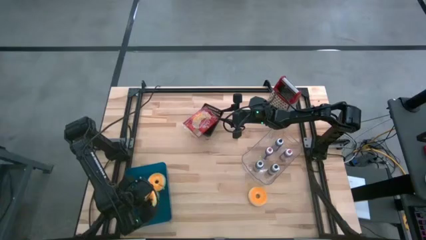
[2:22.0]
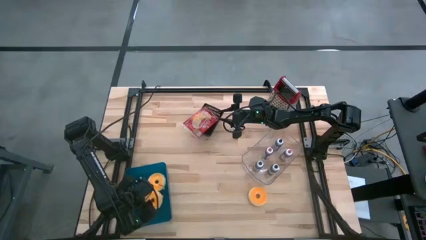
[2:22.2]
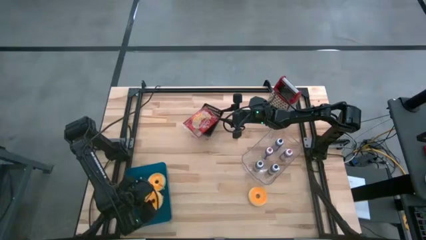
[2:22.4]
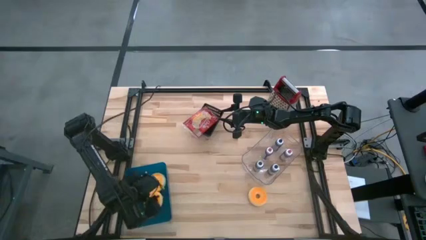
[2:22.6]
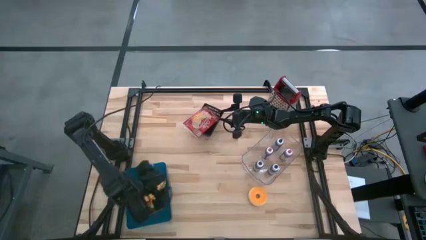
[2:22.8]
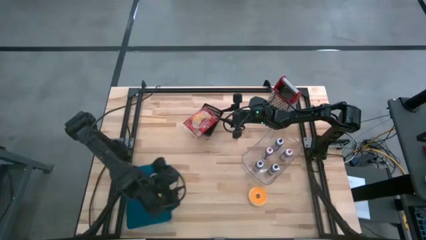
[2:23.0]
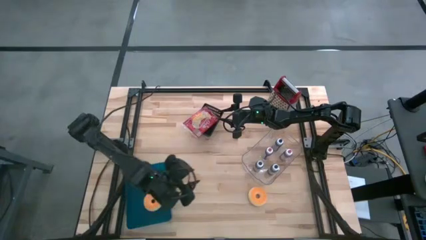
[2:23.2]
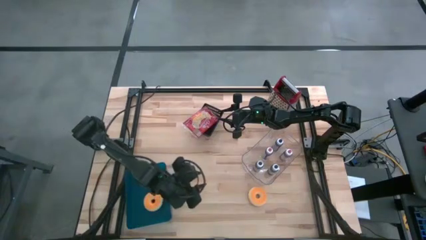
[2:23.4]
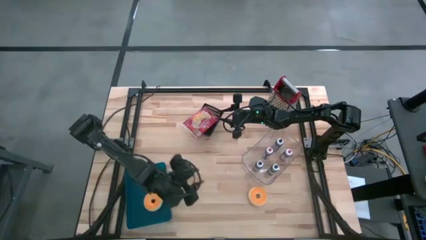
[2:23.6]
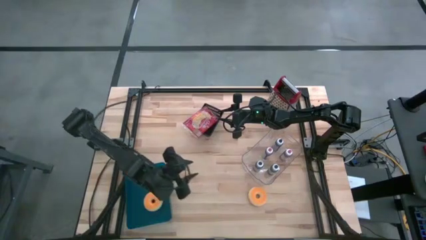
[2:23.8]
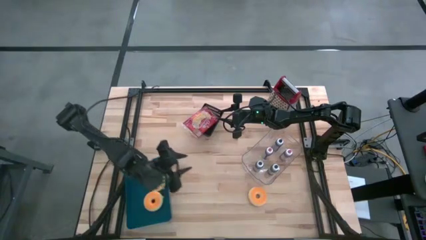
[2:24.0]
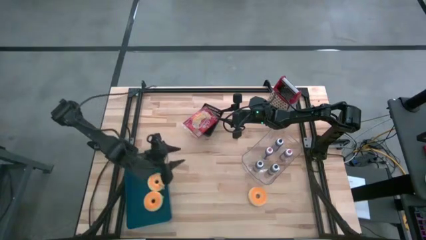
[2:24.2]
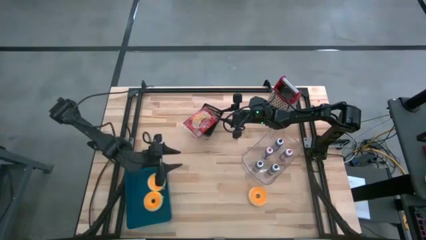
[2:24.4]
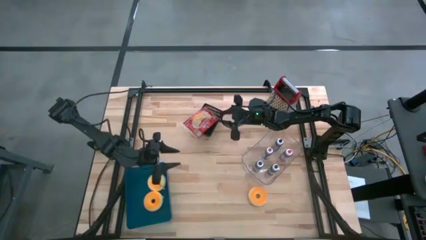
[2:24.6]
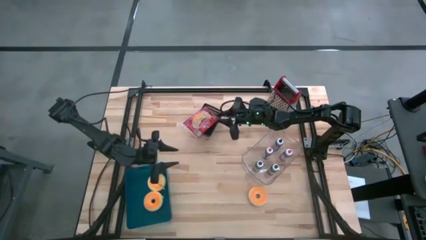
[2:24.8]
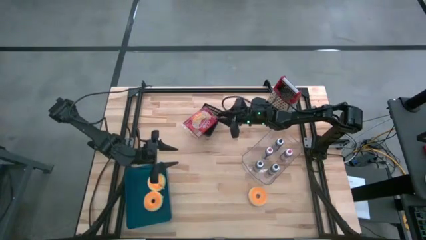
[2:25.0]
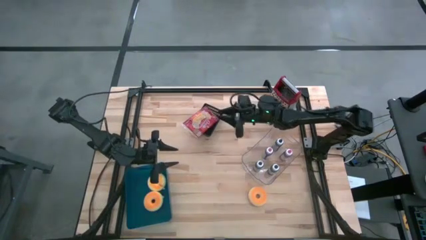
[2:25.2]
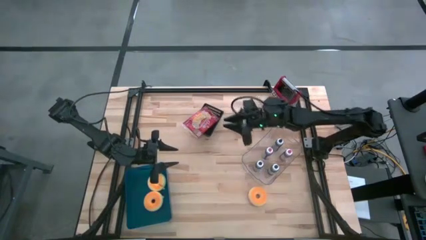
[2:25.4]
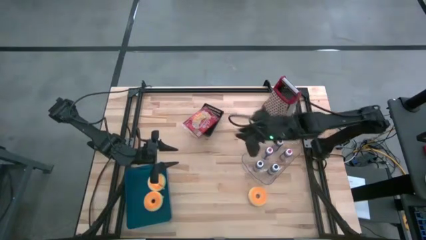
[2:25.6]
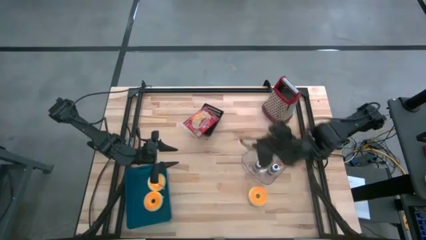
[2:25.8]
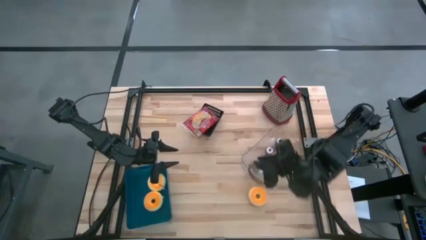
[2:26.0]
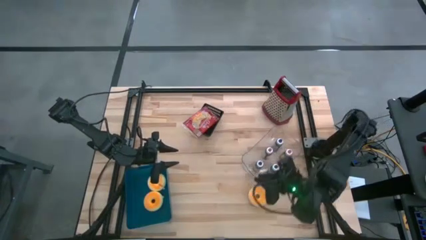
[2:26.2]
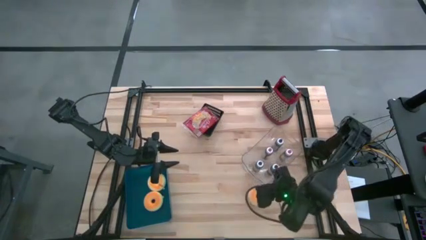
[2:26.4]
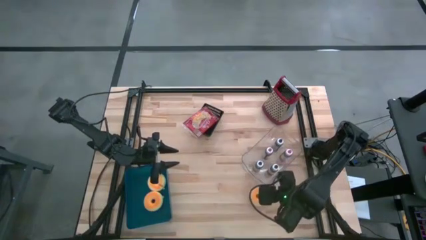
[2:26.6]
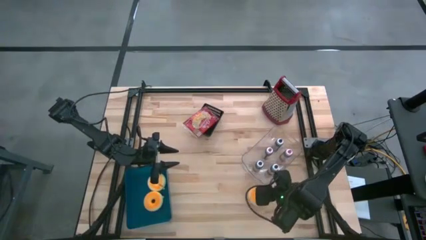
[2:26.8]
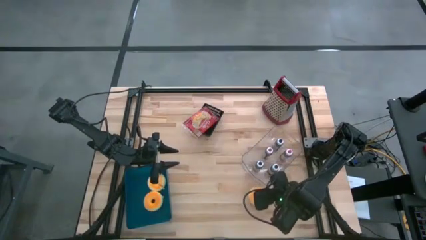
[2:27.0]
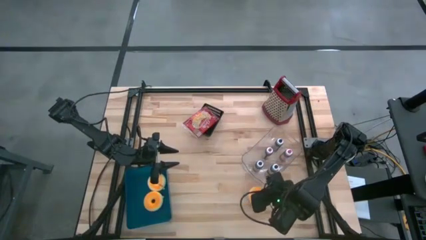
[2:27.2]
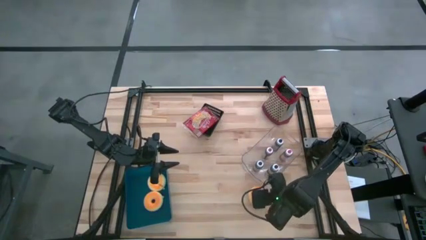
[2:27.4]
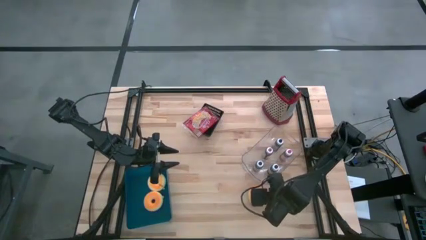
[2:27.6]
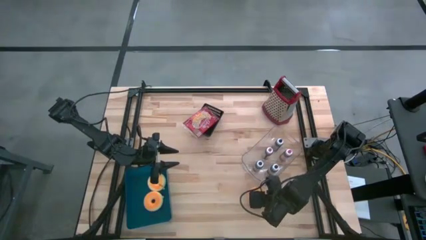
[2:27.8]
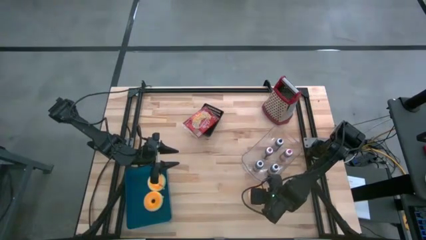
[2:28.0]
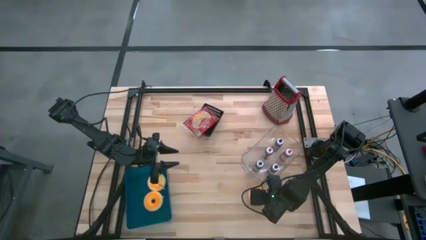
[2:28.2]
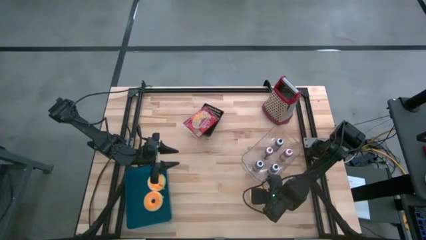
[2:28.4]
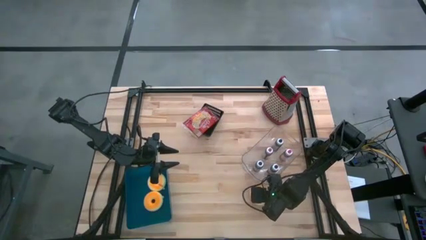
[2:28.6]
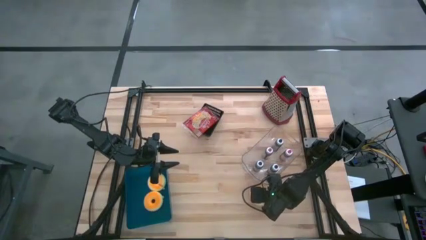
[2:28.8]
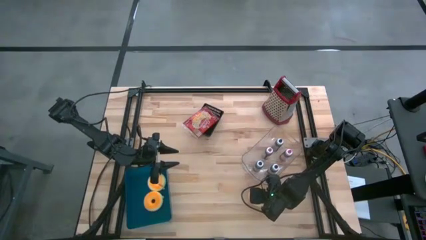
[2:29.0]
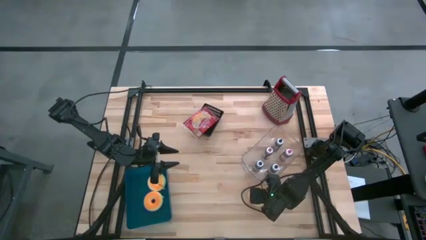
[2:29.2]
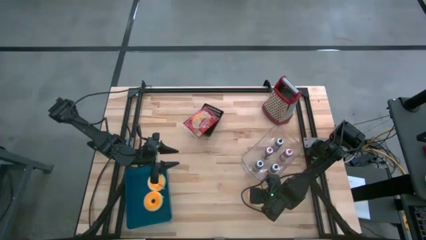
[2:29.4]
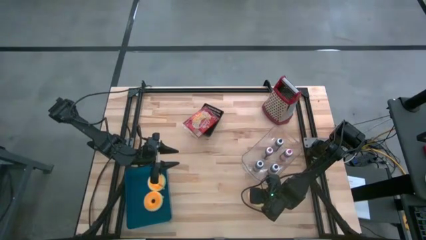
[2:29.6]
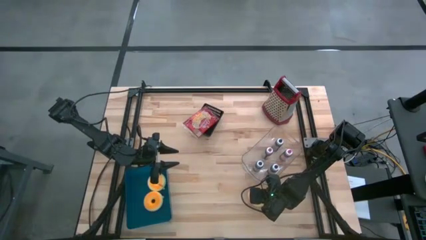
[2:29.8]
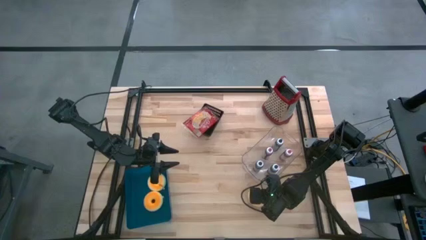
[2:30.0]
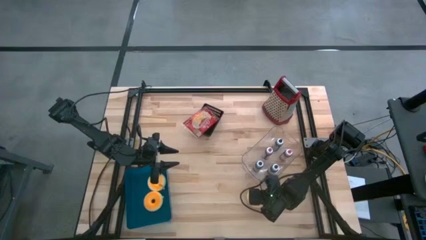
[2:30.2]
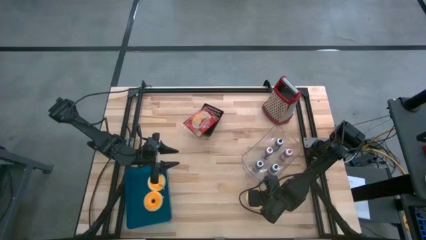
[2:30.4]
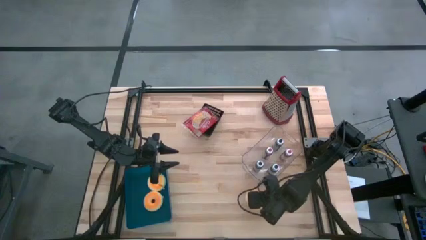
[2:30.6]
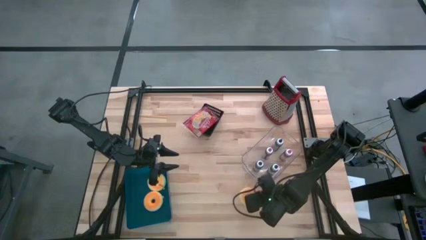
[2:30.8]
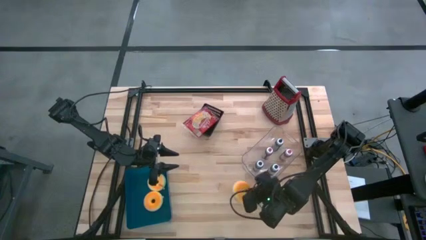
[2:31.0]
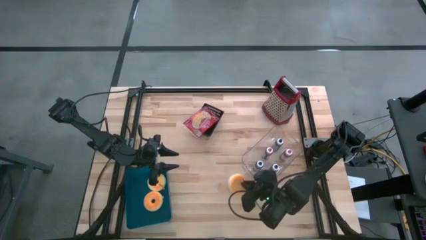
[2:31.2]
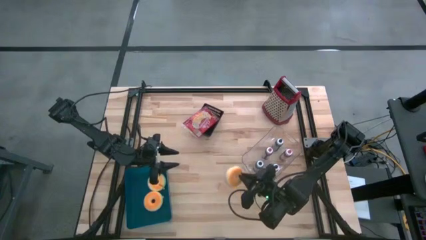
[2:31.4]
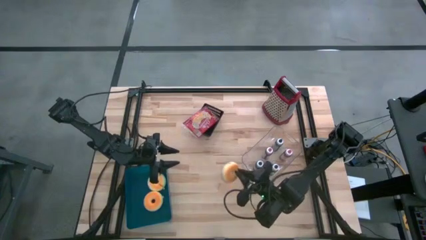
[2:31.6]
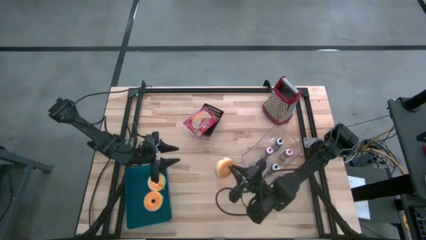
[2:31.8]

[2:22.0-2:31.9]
Task: Pick & Place Food Item
Put the yellow donut into the blue bin

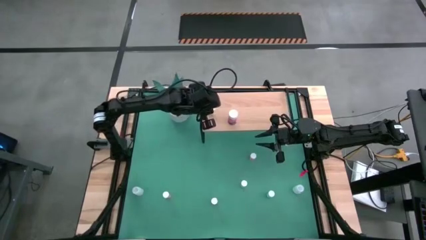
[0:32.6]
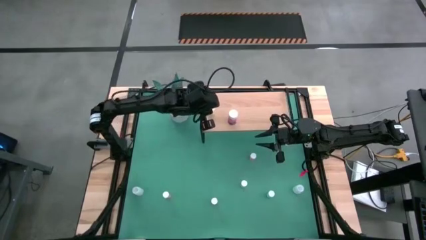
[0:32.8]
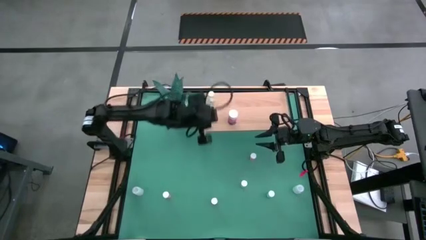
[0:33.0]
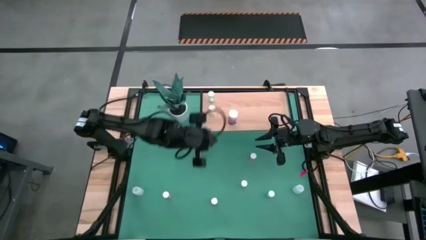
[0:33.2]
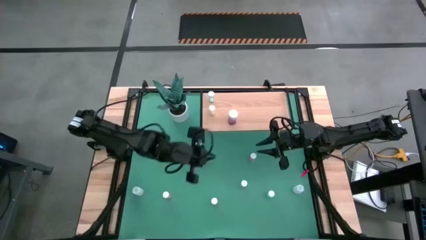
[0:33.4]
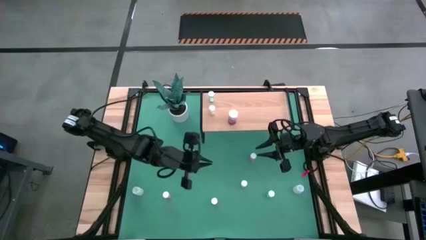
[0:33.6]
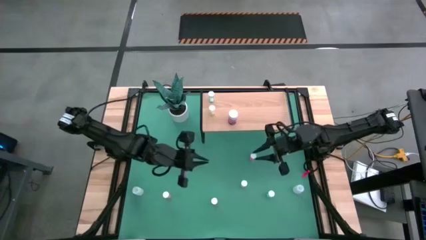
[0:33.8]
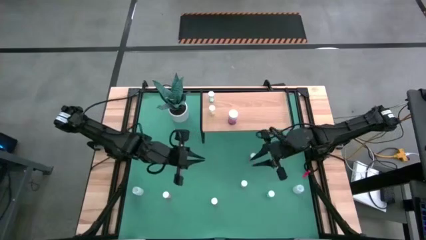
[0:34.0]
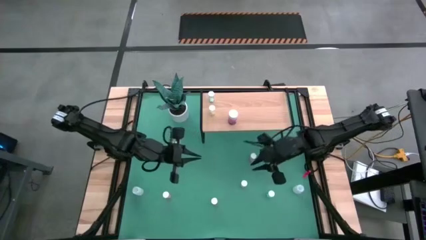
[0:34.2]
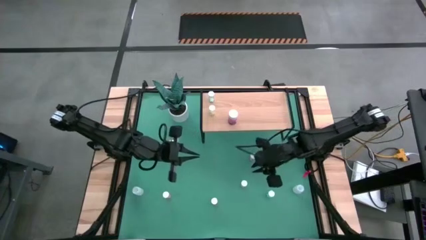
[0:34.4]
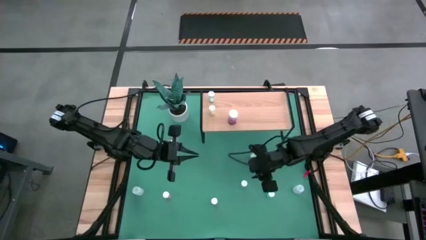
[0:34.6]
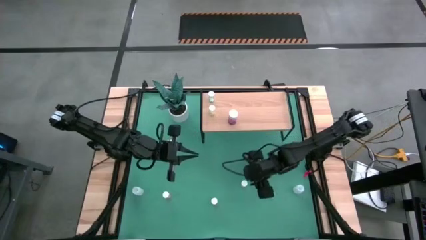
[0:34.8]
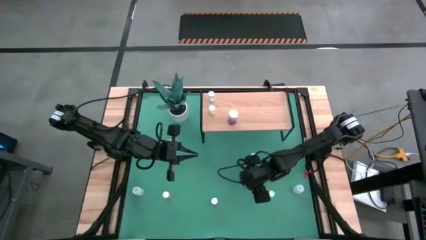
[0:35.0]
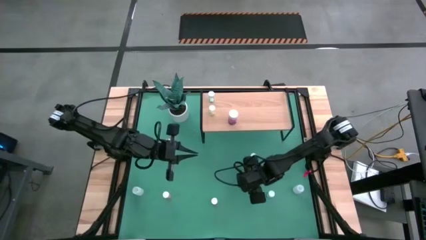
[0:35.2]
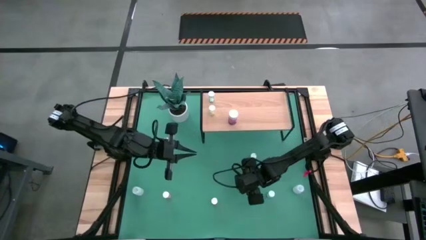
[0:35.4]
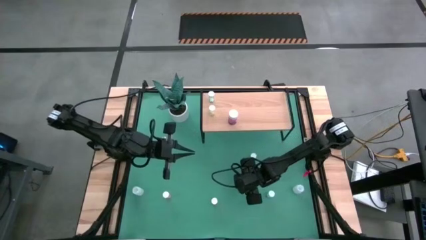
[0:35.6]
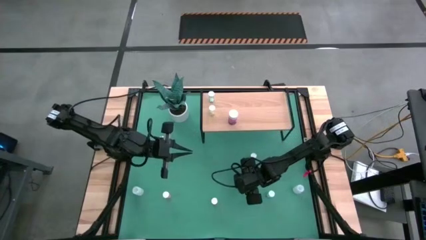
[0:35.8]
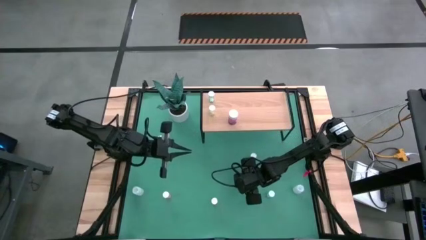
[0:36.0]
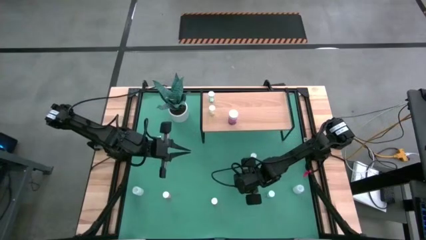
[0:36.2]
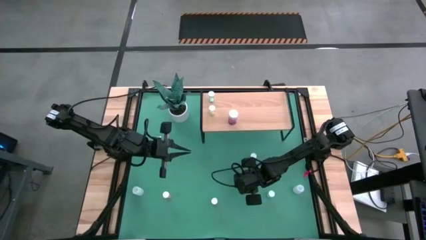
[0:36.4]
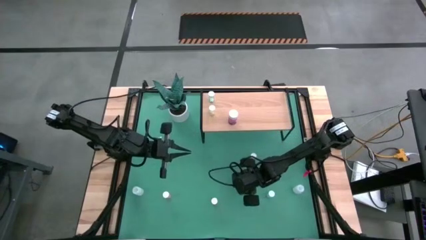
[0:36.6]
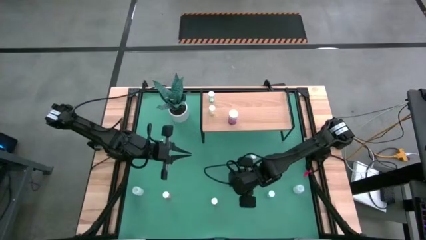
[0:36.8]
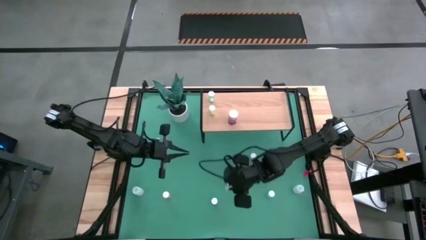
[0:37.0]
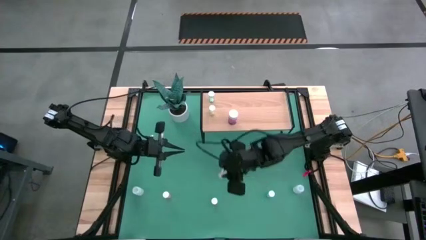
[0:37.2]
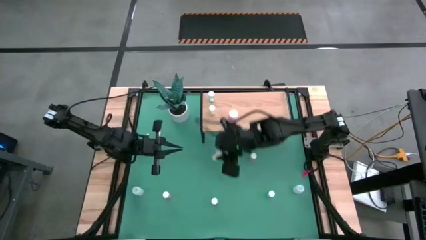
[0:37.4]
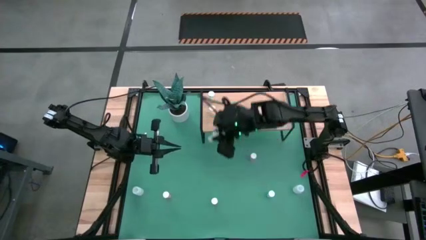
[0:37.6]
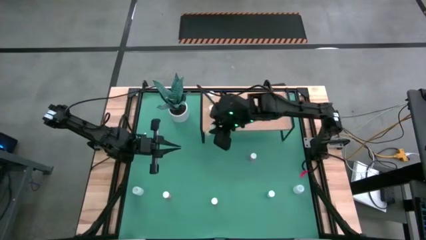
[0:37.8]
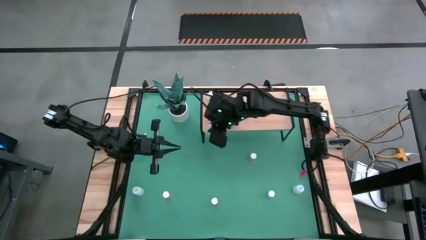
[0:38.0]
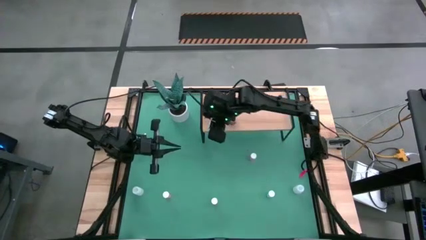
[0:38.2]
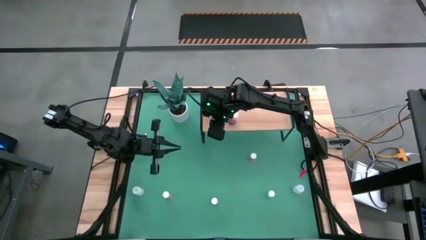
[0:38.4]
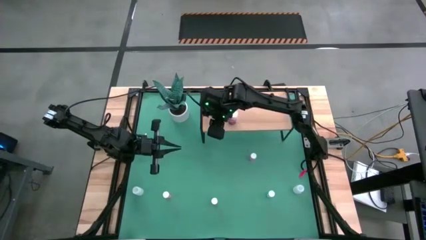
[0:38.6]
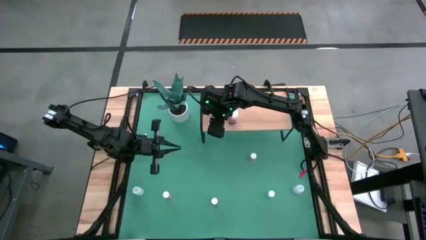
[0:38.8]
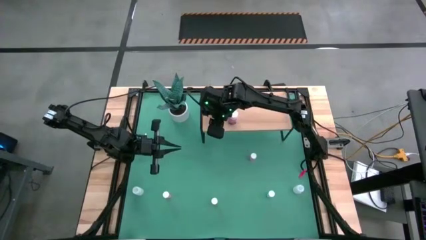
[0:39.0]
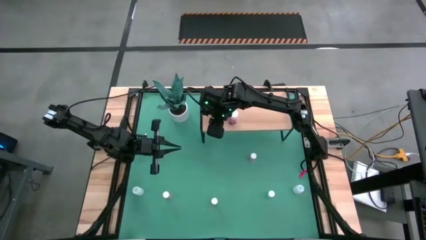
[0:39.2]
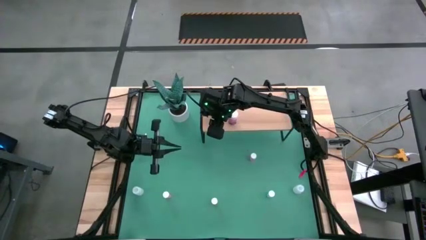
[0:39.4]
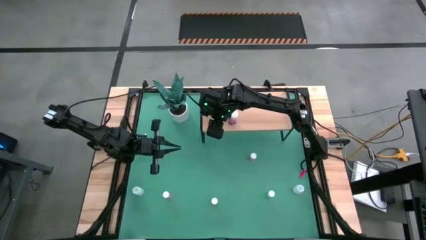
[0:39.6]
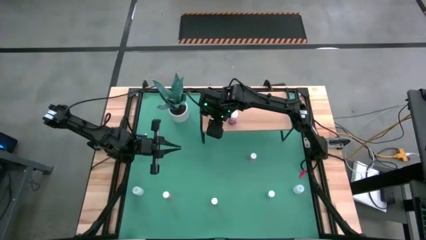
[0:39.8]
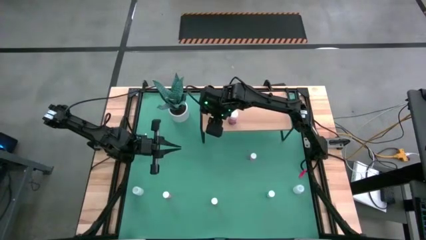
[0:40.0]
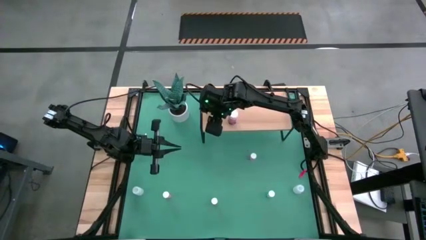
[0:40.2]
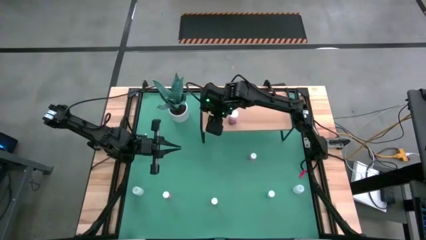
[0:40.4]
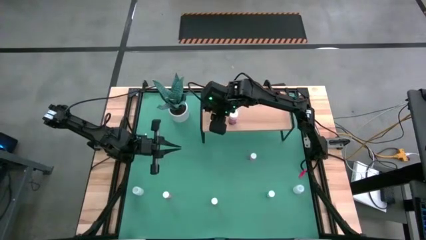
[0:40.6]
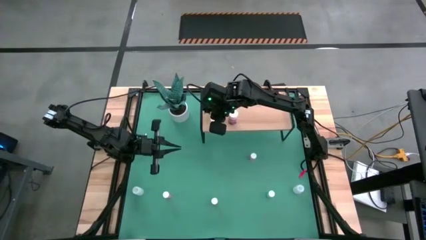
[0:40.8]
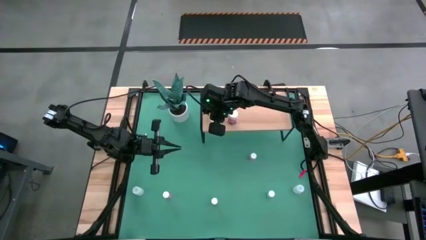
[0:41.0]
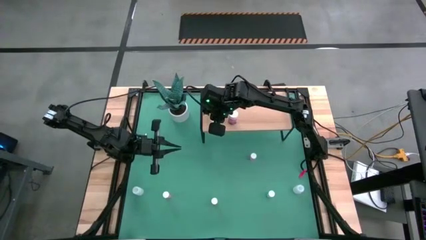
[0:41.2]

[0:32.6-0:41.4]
Task: Pick and place medicine bottles onto shelf by color
Put the yellow pill bottle on the shelf
